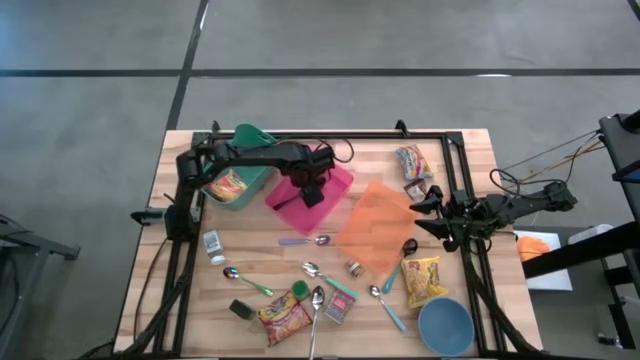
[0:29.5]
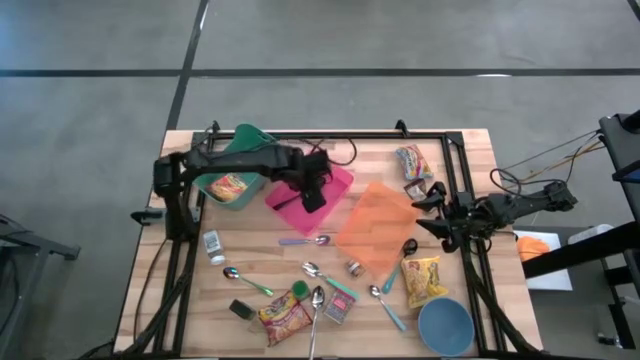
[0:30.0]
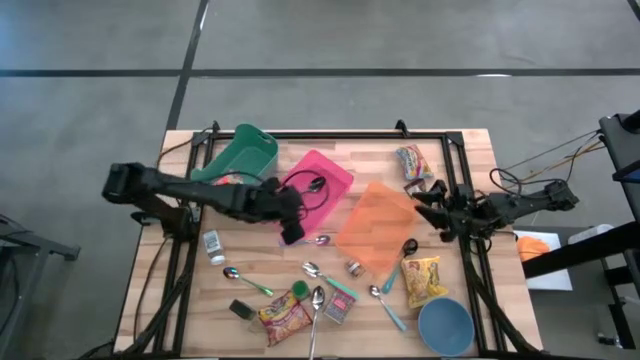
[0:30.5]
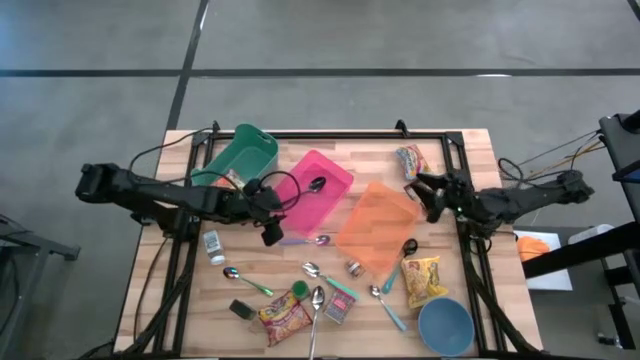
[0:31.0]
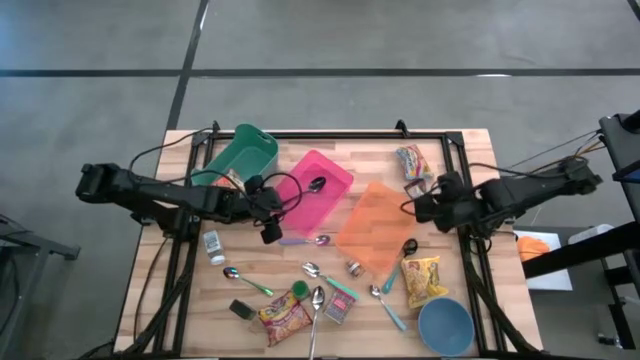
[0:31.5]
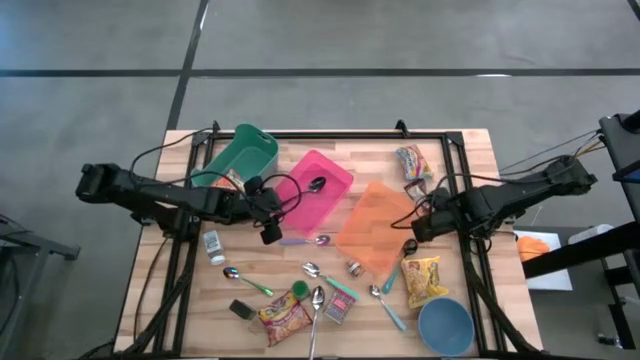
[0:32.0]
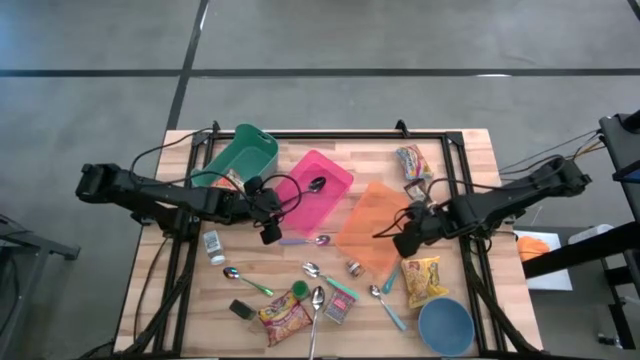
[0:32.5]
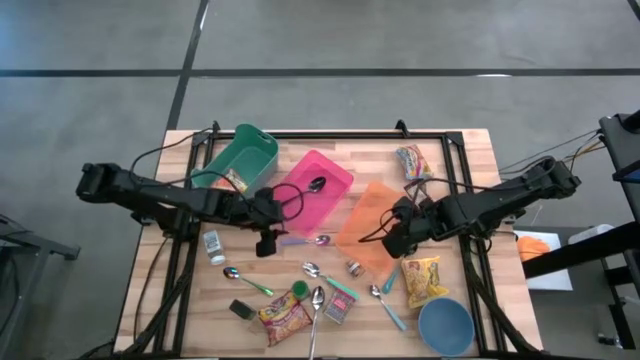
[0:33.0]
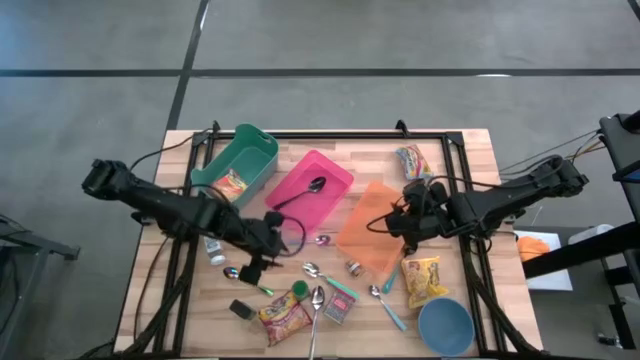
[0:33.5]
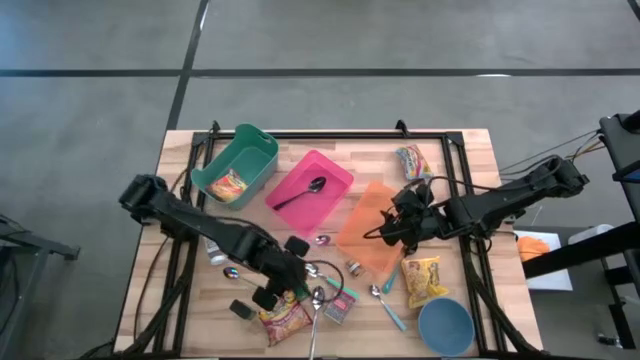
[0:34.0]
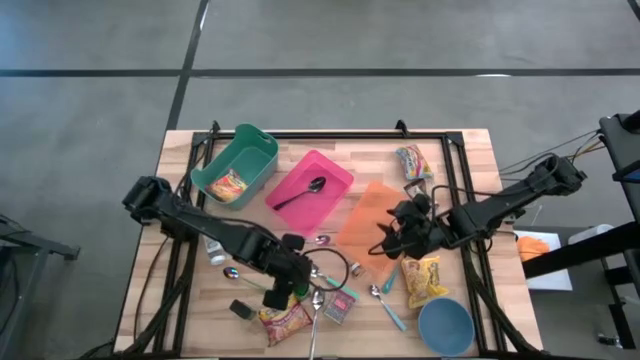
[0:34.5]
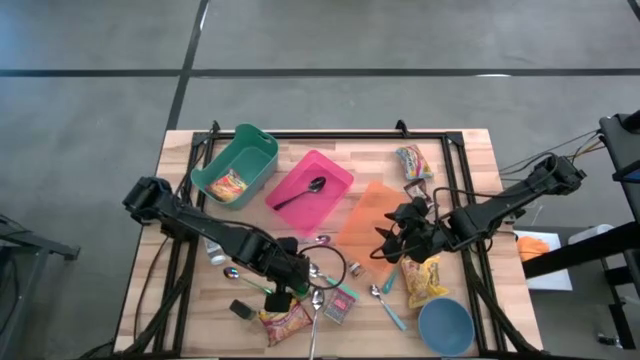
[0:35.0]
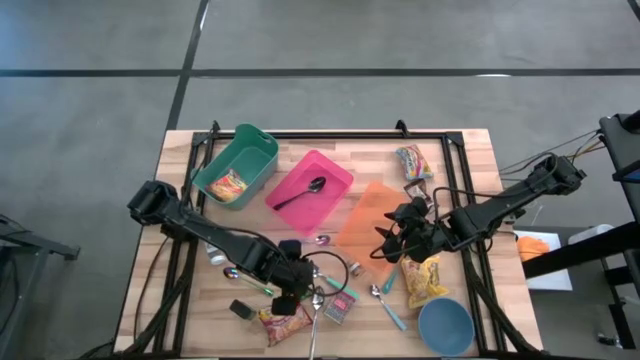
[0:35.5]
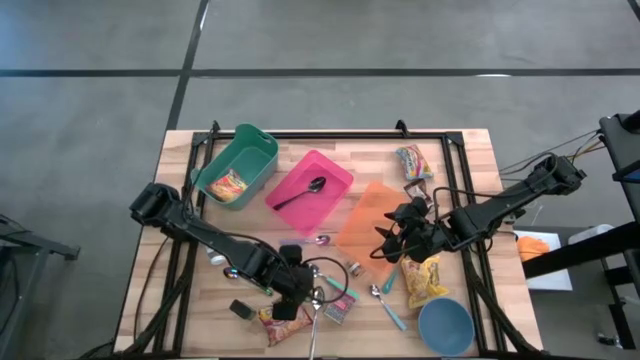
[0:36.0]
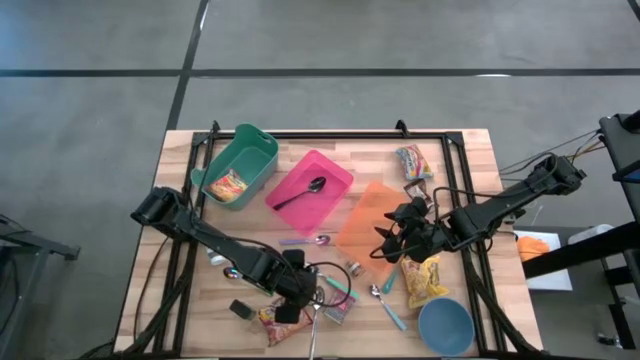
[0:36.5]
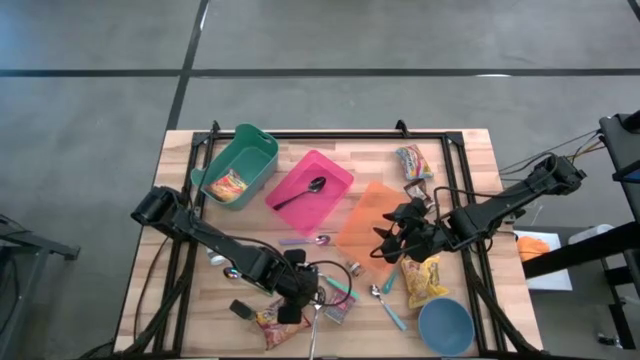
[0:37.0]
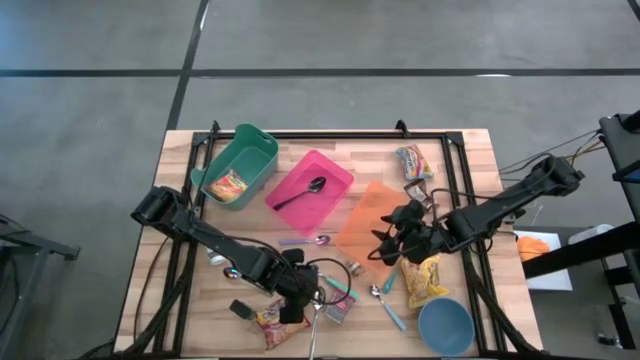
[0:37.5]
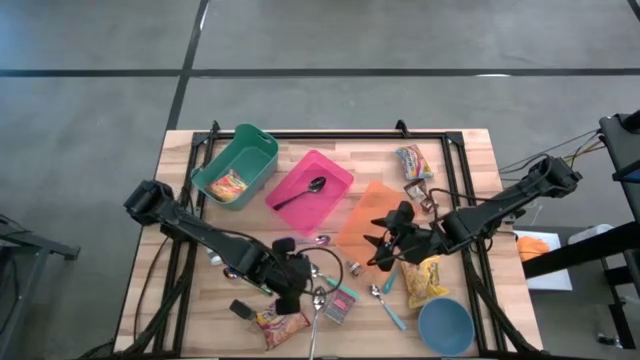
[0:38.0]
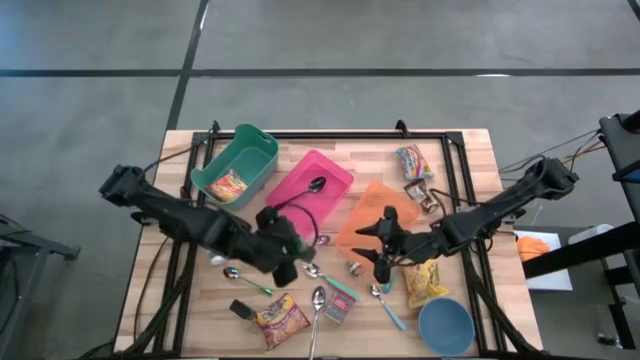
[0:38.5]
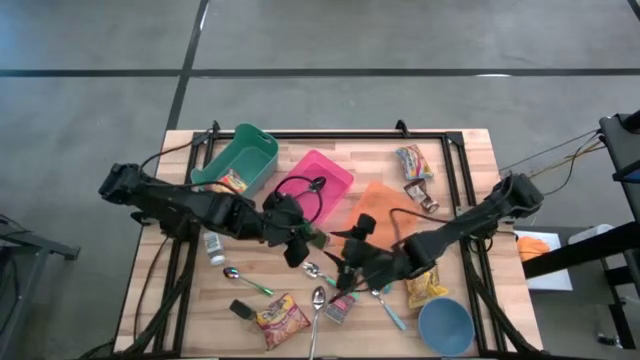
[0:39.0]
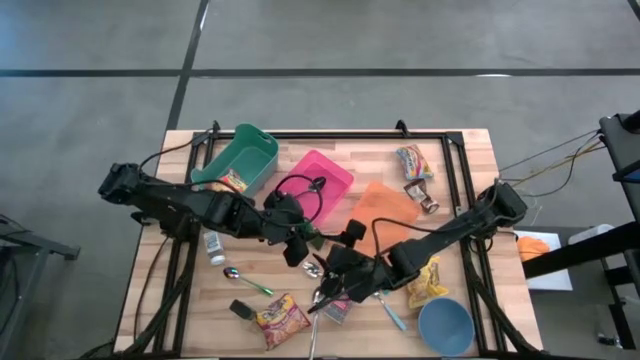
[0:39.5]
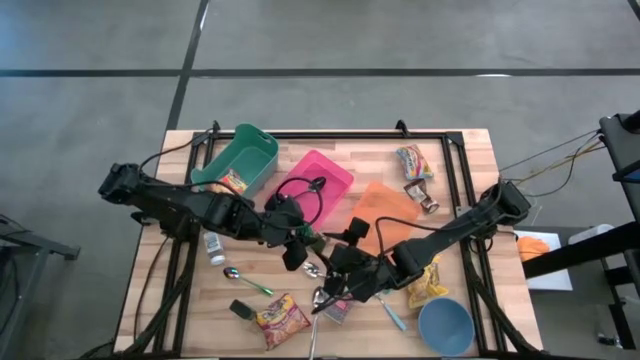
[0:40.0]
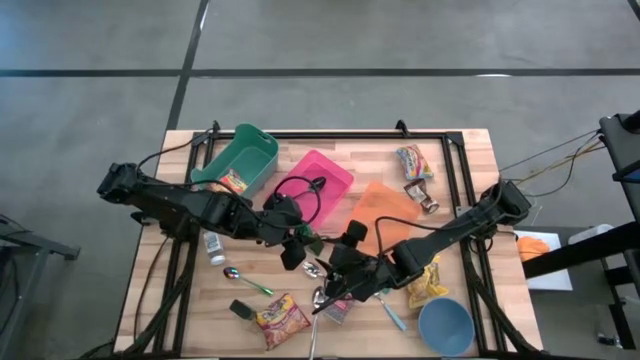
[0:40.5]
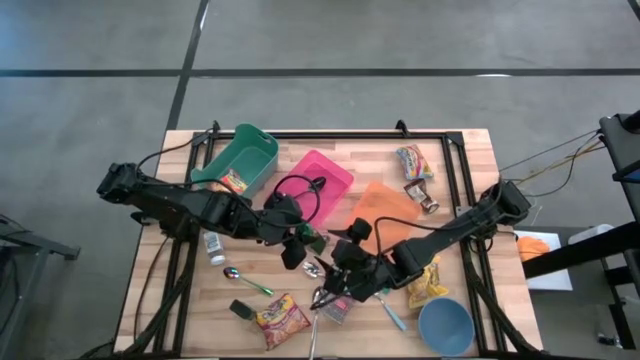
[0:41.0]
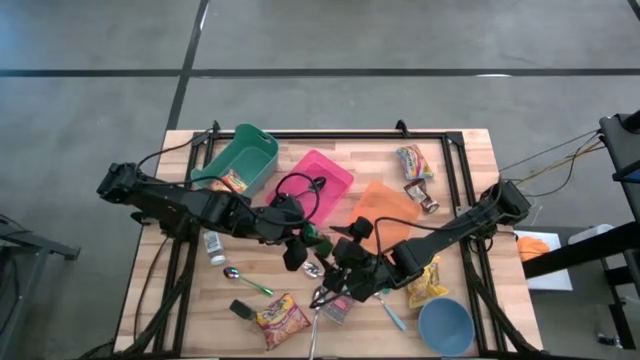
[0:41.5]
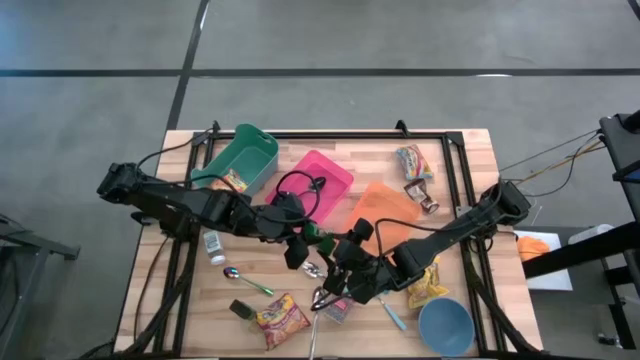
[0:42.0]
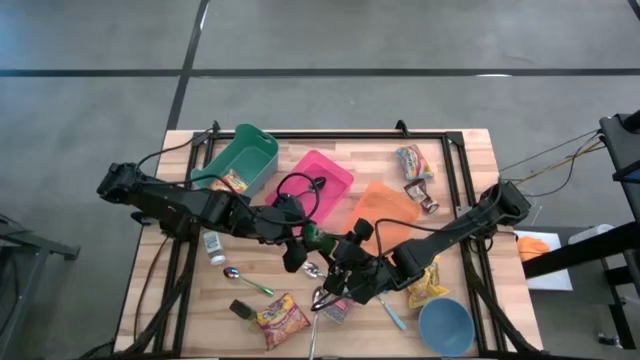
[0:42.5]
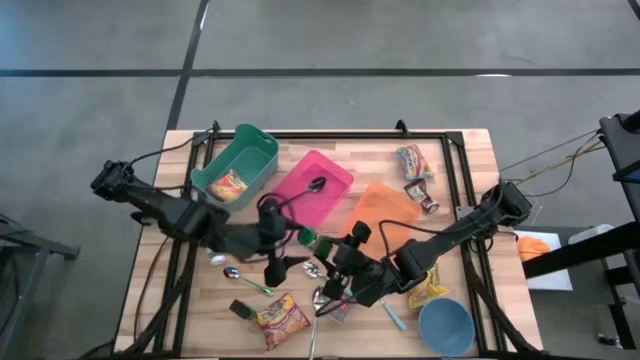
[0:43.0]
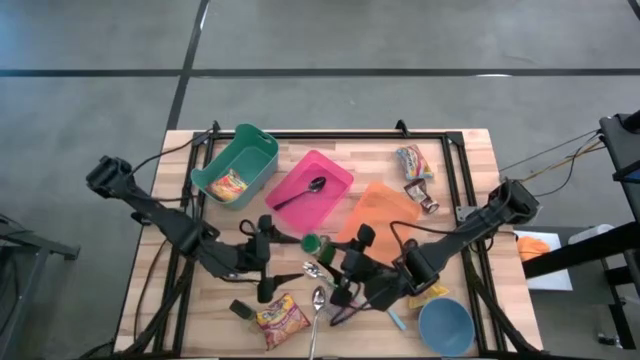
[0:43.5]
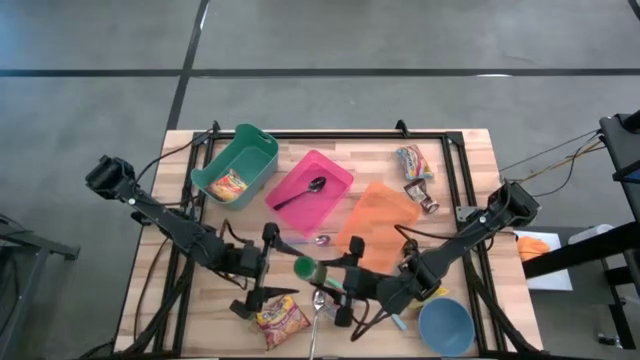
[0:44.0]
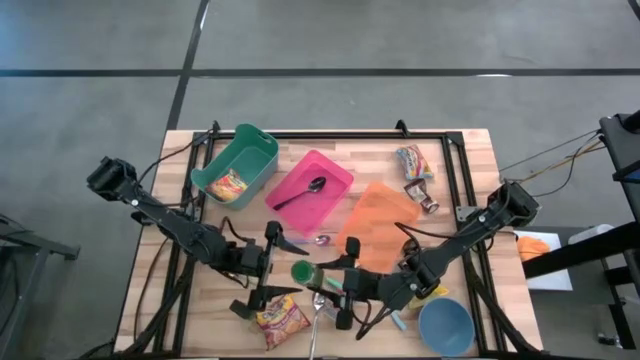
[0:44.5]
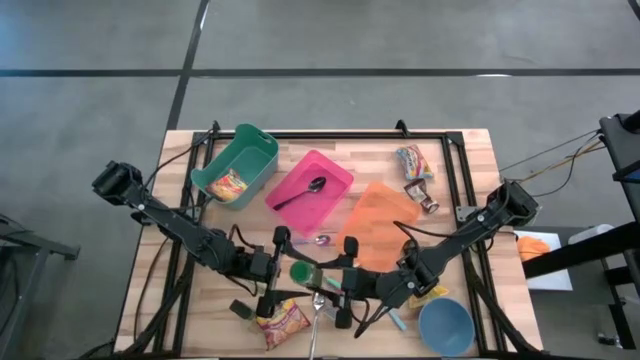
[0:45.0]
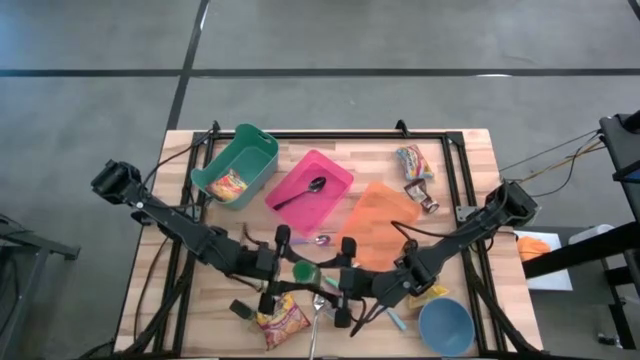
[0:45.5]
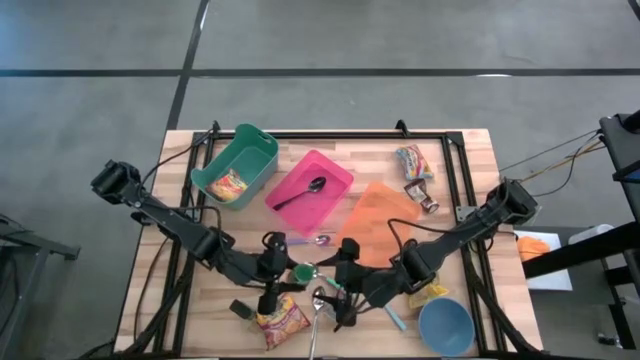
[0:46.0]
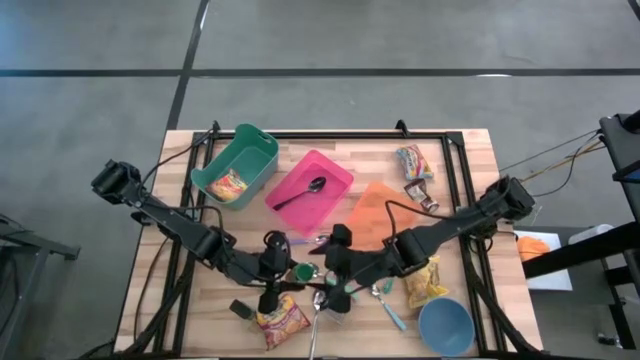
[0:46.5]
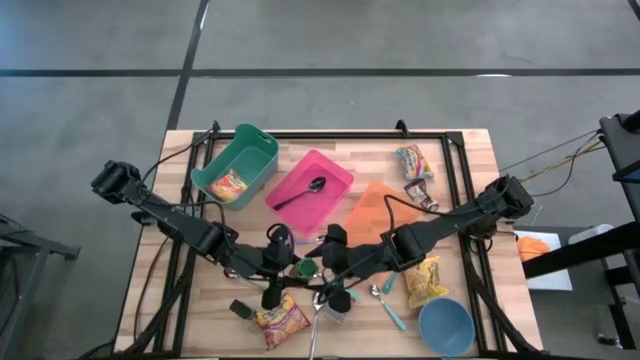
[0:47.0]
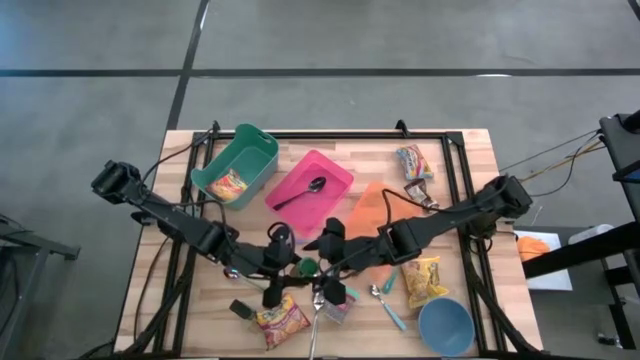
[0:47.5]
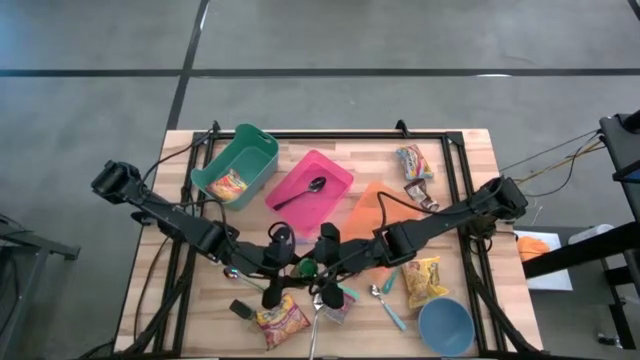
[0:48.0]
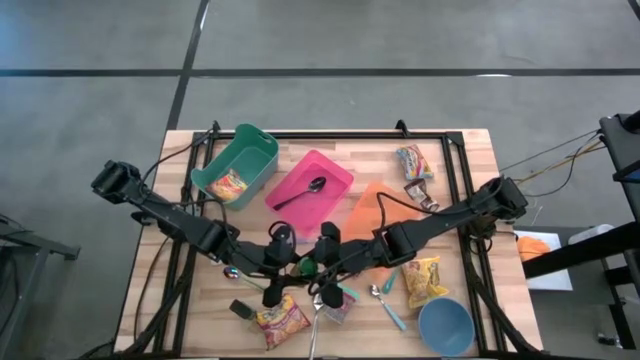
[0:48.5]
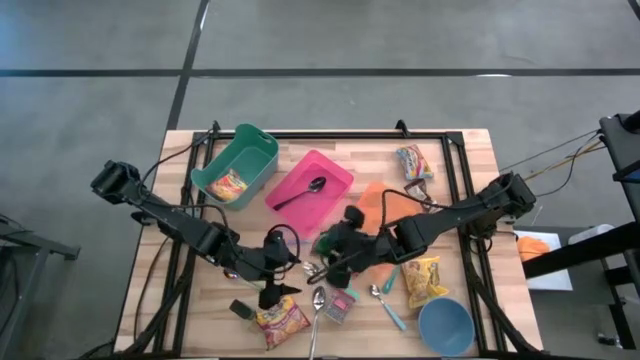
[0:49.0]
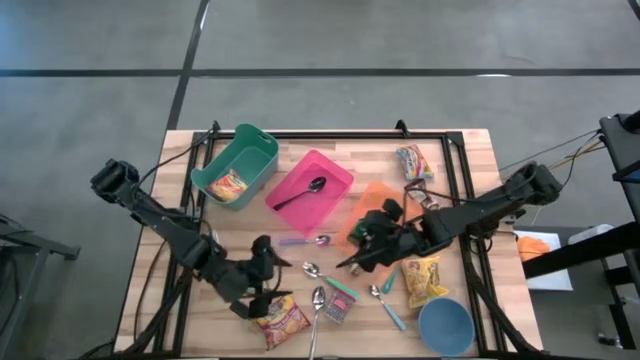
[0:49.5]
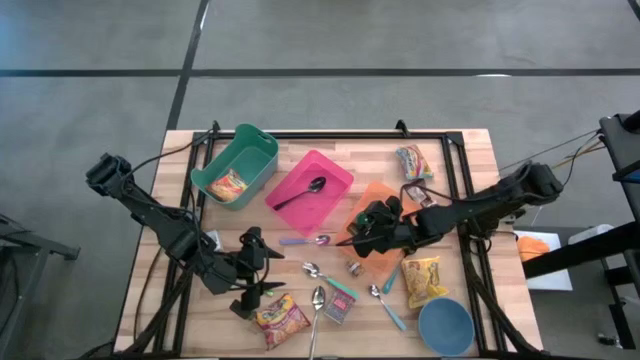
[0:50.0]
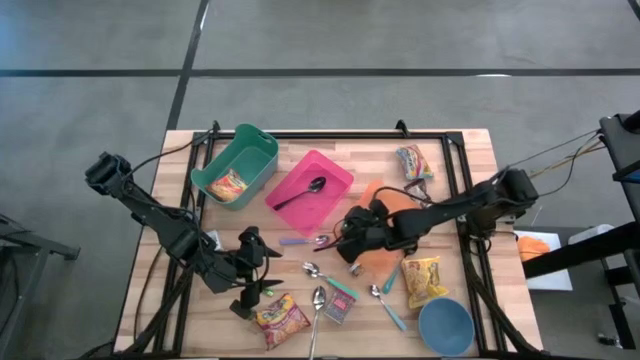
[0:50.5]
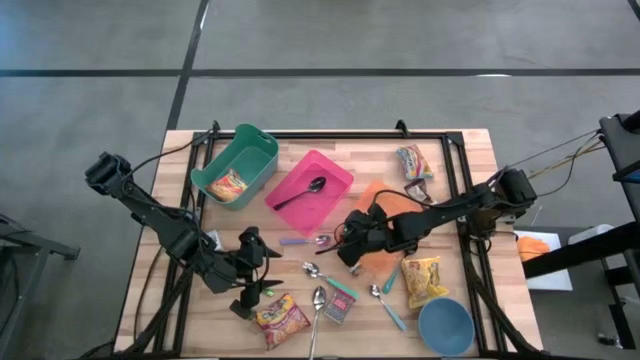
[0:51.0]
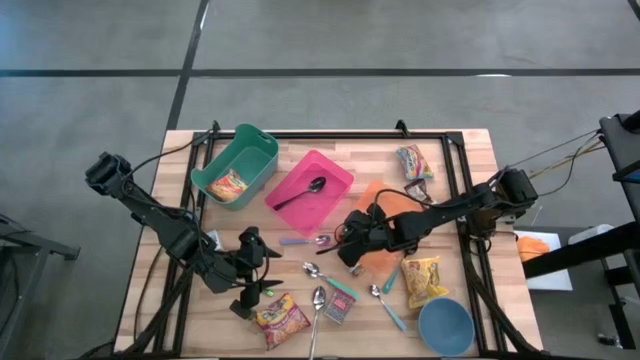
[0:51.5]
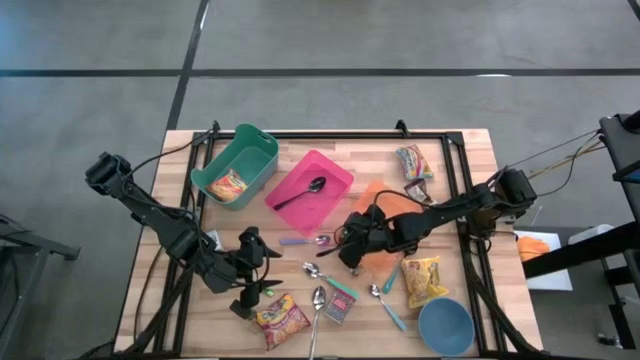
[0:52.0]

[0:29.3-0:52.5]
Put the green seasoning bottle into the orange bin
